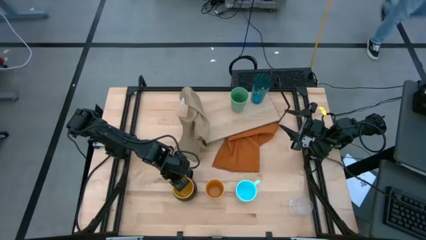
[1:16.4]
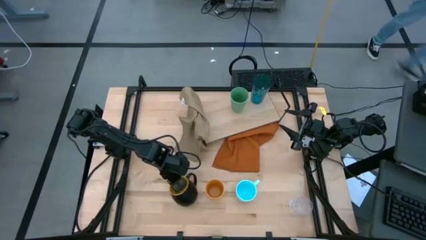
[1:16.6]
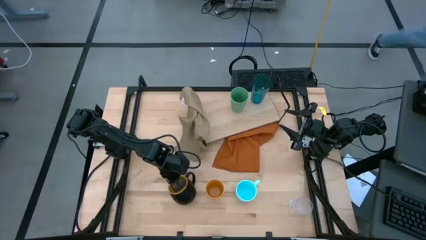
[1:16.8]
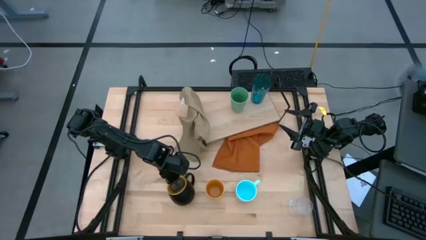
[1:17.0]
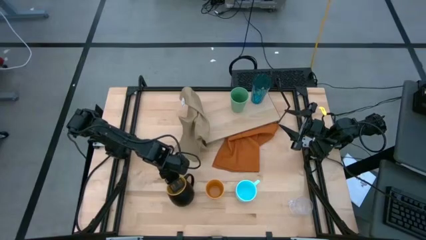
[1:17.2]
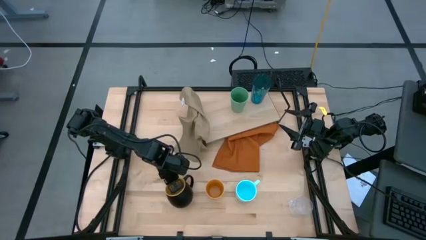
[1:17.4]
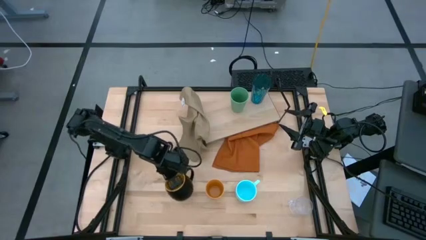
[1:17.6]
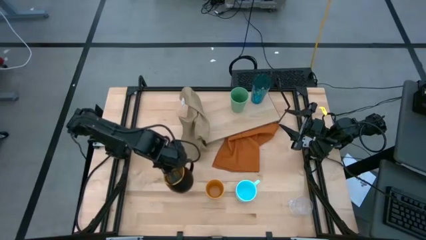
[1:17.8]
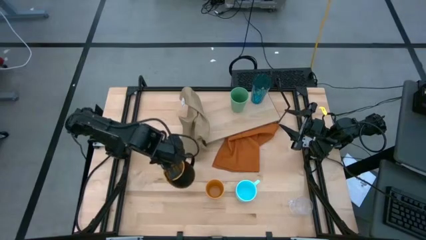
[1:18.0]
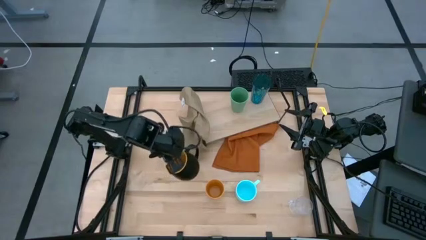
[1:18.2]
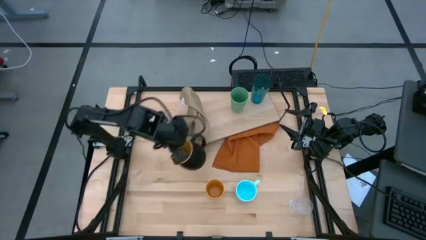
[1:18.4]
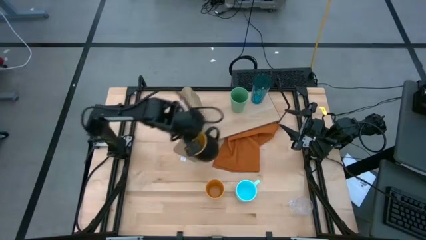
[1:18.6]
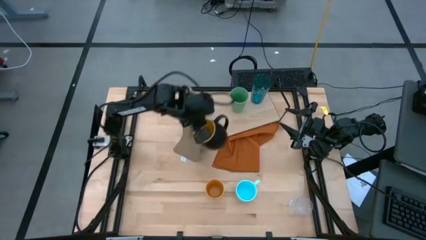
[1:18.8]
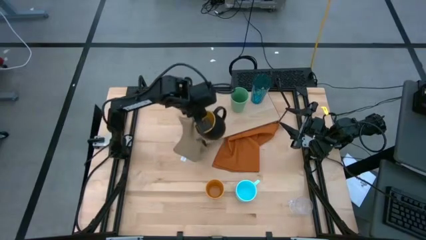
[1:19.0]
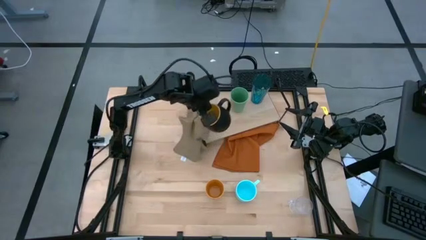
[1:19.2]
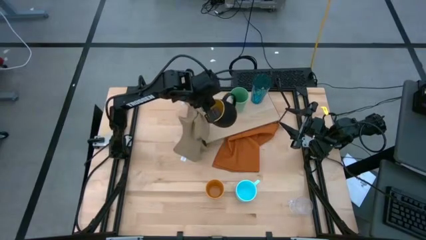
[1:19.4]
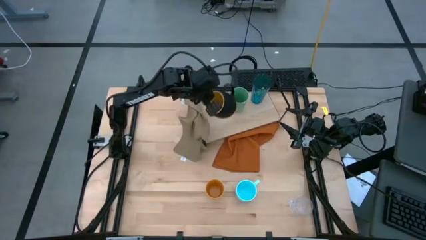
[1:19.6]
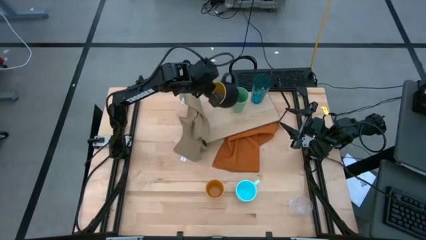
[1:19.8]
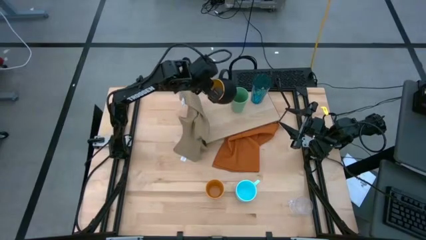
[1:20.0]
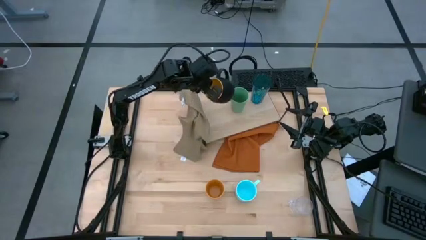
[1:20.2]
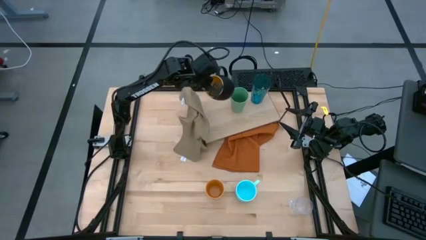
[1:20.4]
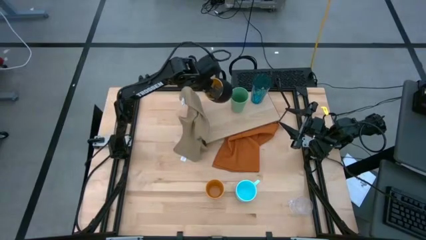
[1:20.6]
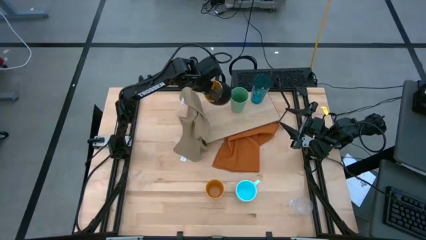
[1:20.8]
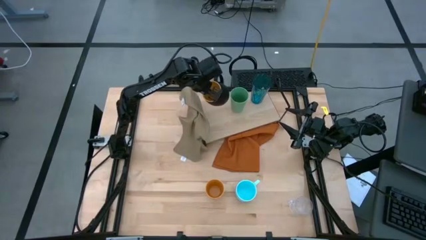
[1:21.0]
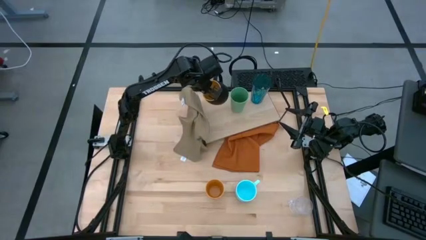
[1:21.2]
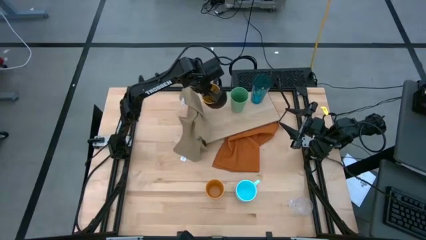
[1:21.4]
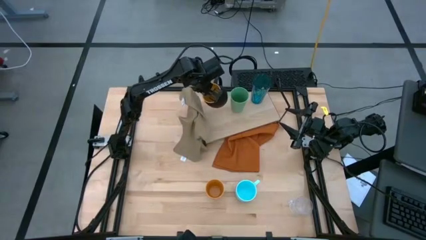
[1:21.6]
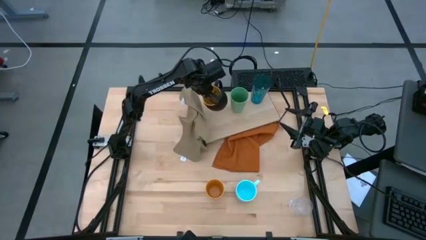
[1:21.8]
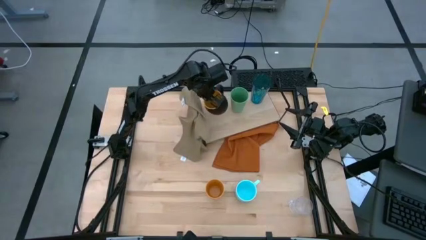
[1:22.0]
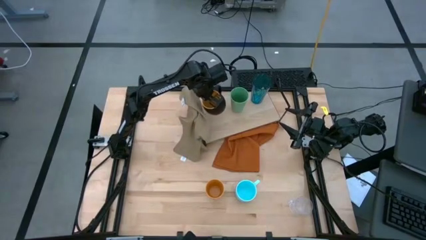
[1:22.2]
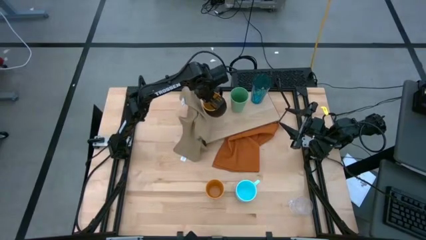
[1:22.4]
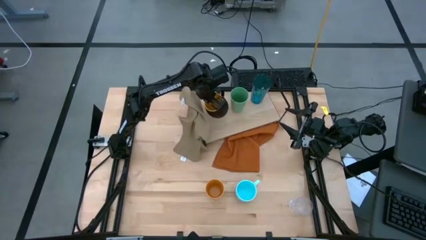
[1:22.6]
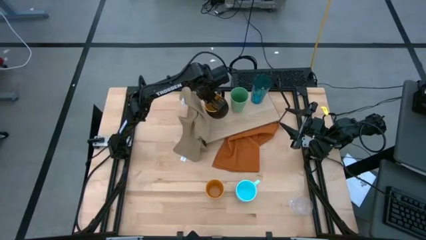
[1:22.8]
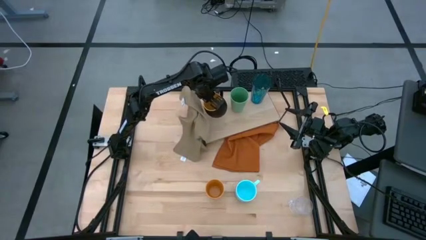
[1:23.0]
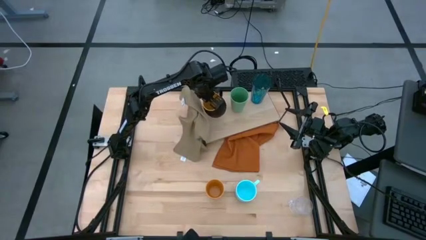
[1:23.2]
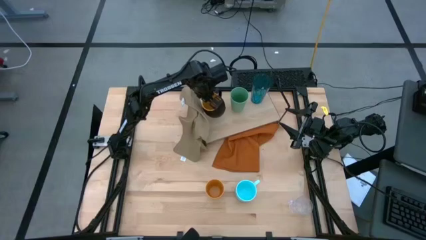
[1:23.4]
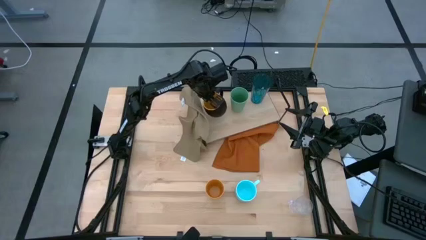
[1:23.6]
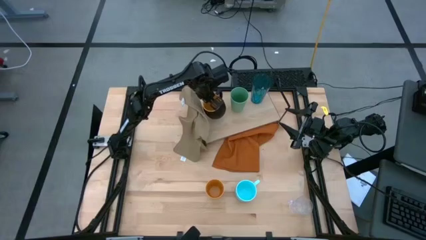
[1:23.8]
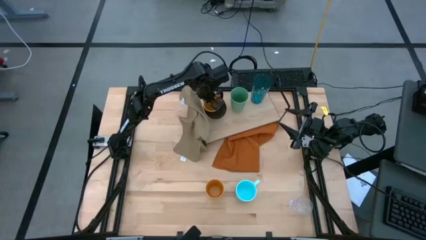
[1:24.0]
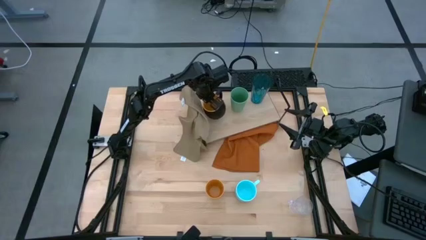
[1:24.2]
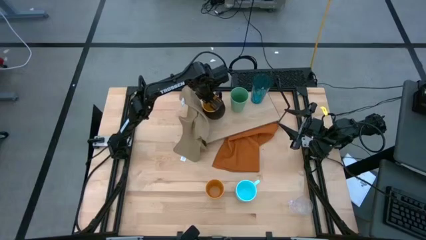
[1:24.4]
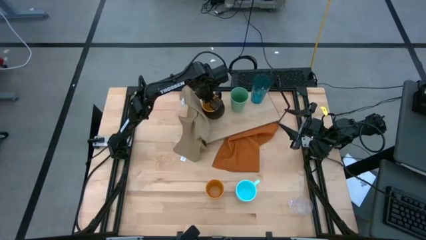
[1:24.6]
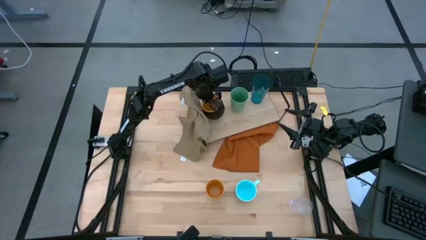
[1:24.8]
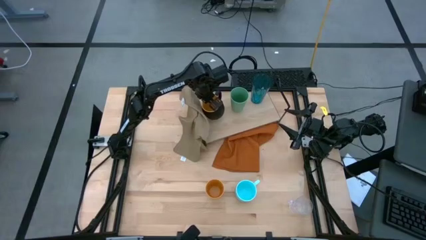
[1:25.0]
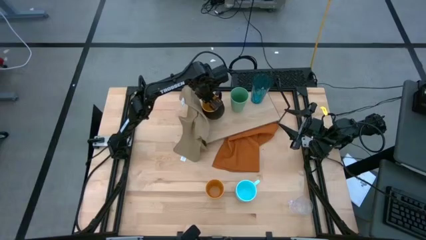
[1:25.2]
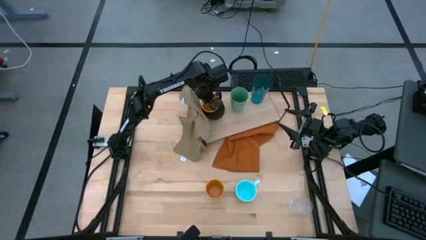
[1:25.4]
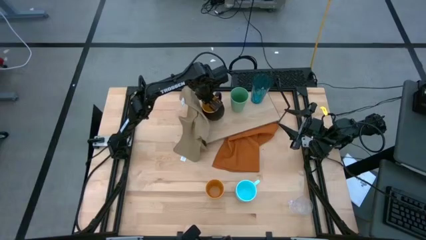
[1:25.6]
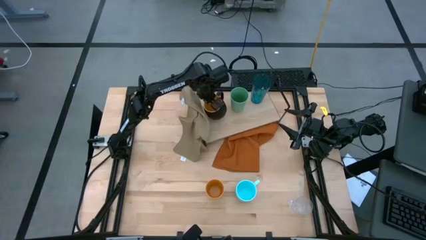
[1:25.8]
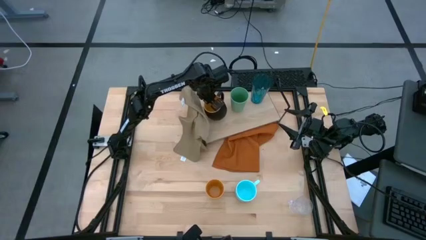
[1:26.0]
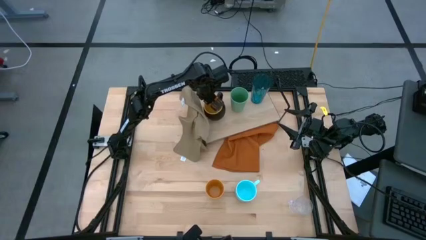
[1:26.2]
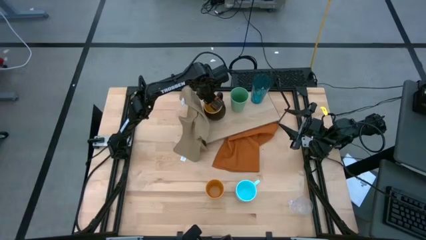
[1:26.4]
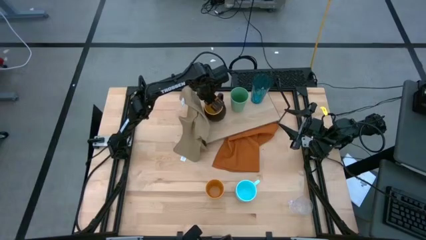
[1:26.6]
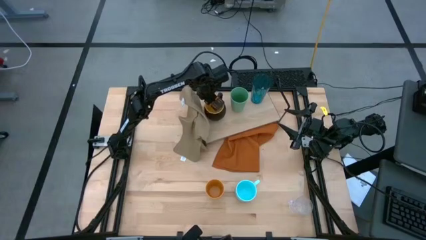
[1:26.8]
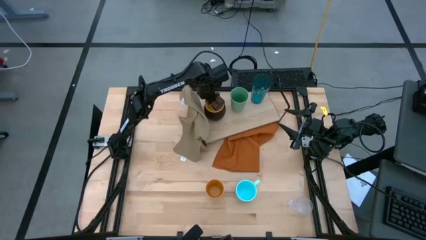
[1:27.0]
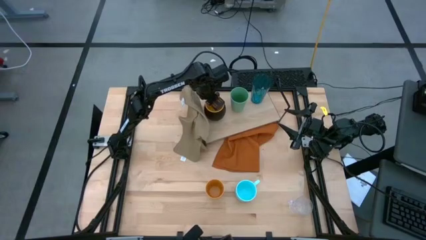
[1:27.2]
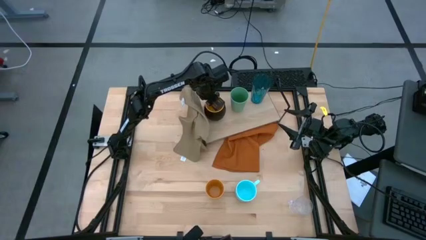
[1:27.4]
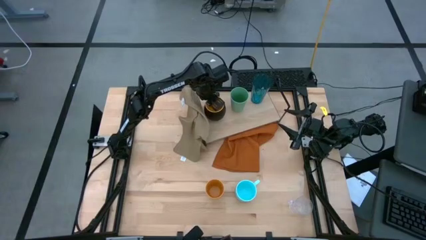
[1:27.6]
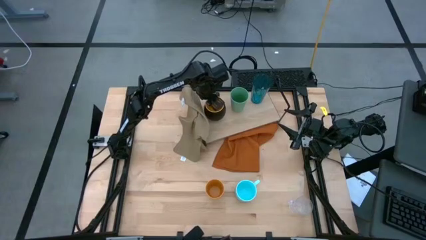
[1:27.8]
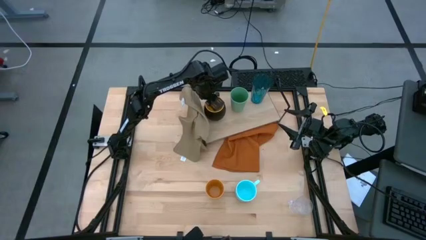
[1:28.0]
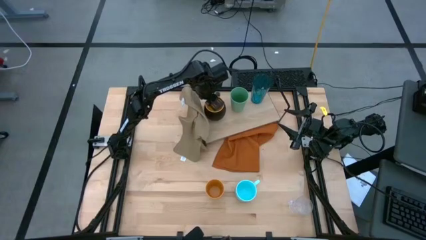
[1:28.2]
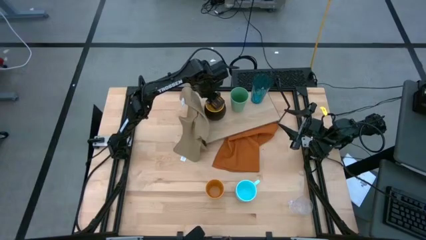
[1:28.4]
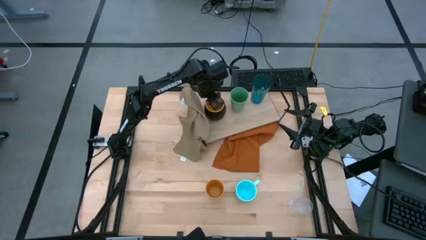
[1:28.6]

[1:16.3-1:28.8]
Task: Stack small to large cups/mugs on shelf
Put the black mug on the shelf

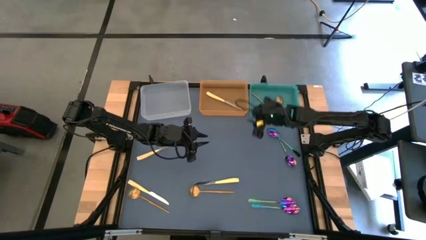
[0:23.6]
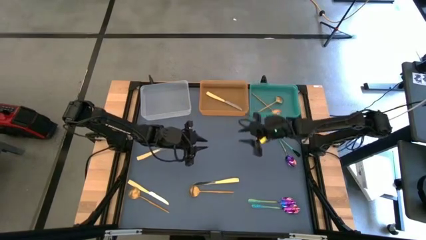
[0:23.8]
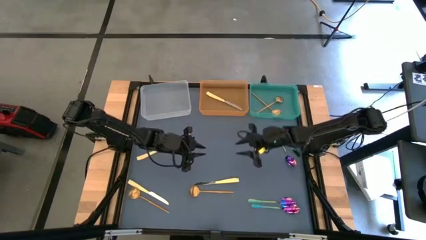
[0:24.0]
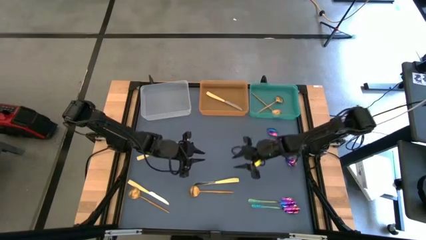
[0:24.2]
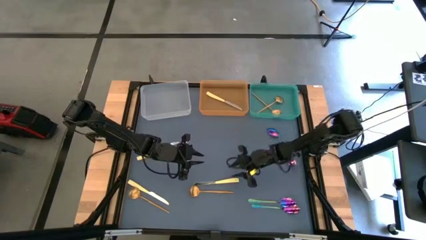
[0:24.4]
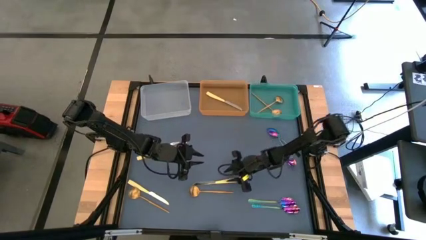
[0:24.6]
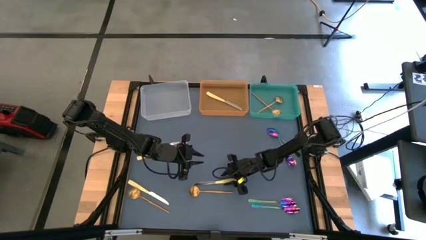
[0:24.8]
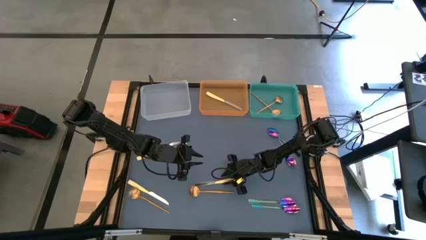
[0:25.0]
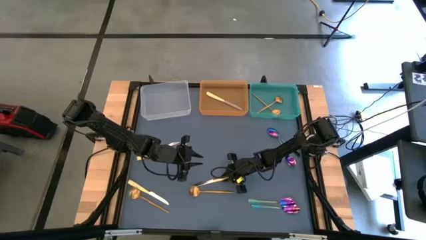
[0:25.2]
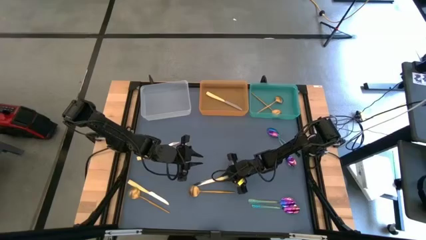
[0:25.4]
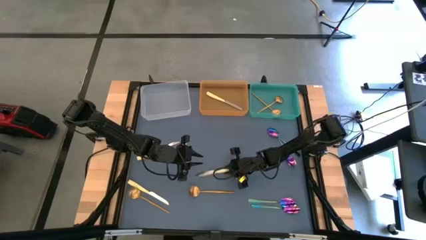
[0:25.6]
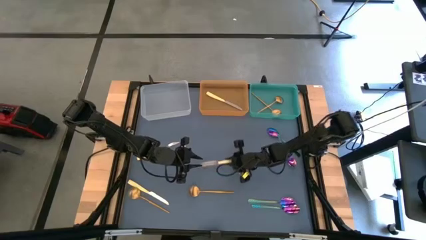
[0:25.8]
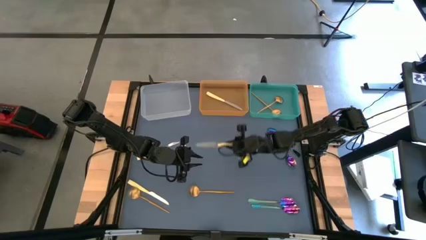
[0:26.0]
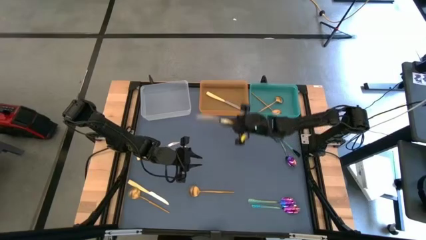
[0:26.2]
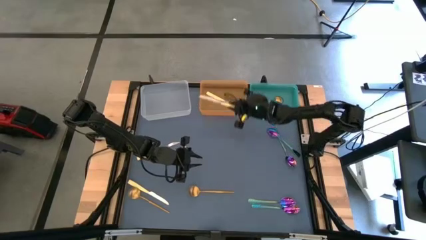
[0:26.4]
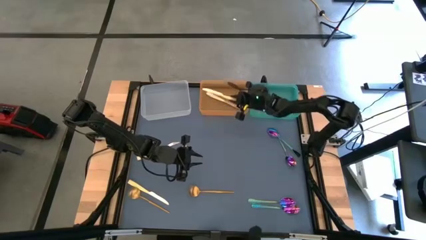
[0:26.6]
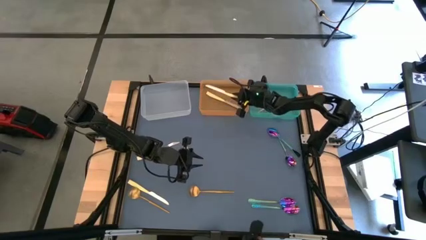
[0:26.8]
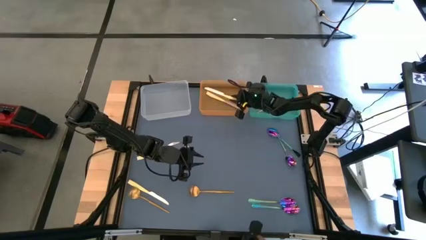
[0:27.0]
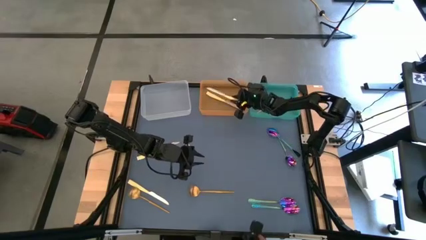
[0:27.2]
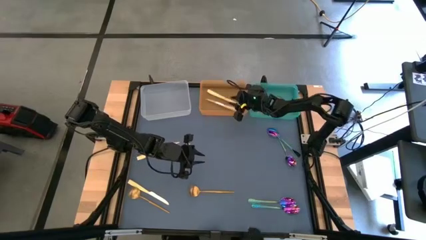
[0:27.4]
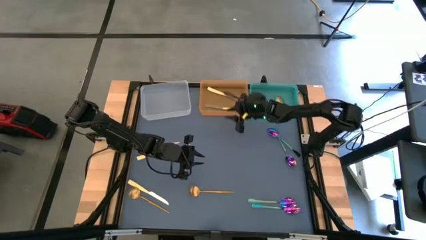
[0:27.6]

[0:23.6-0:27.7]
Task: Sort silverware by color (type)
Put the yellow table knife into the orange bin
